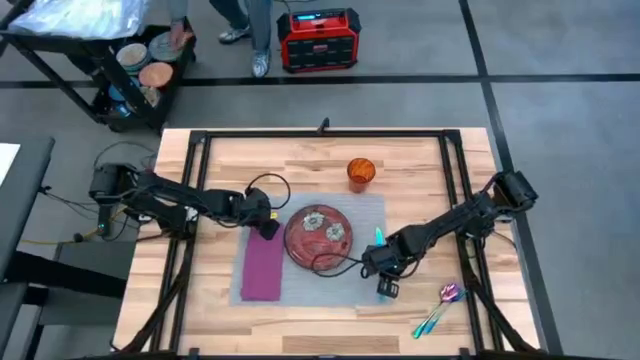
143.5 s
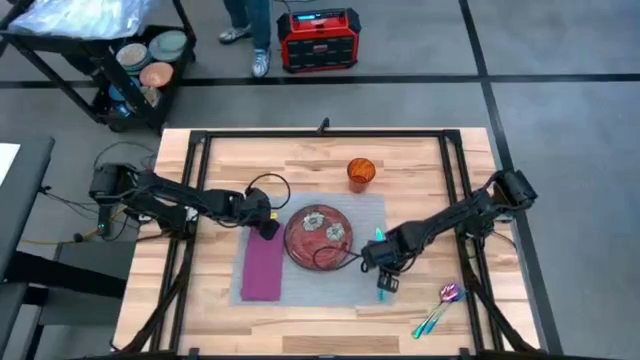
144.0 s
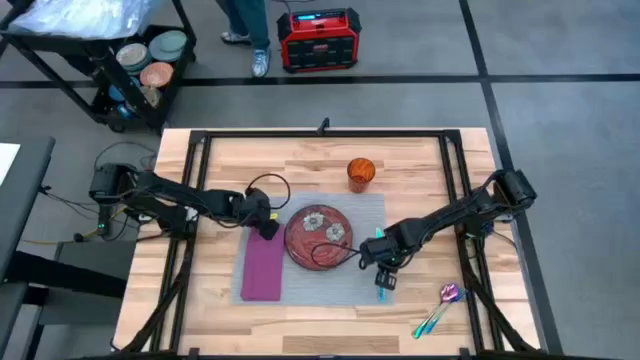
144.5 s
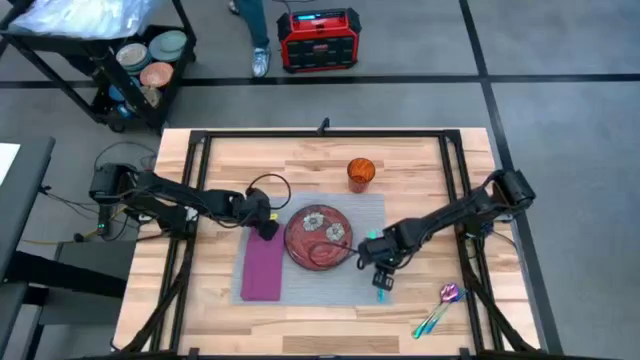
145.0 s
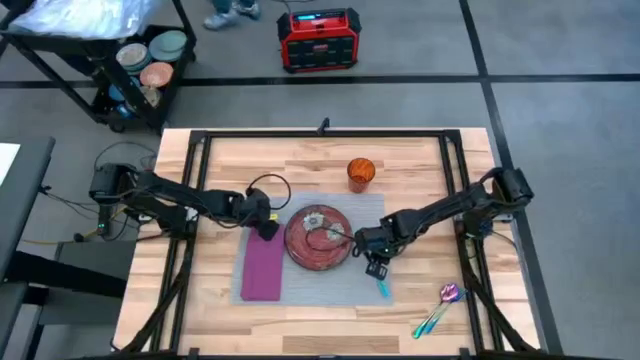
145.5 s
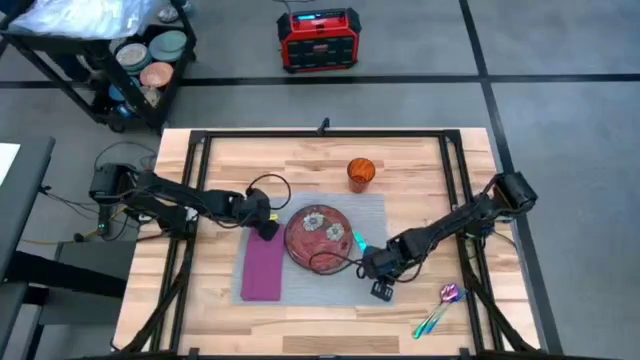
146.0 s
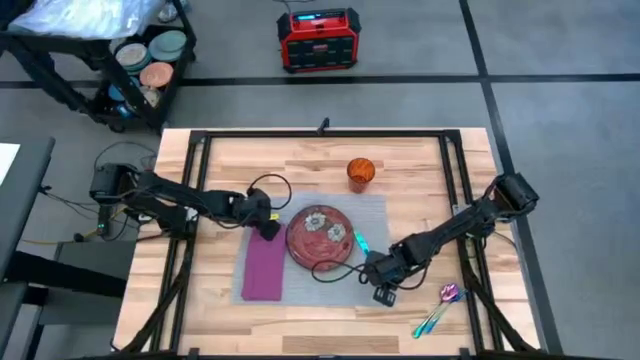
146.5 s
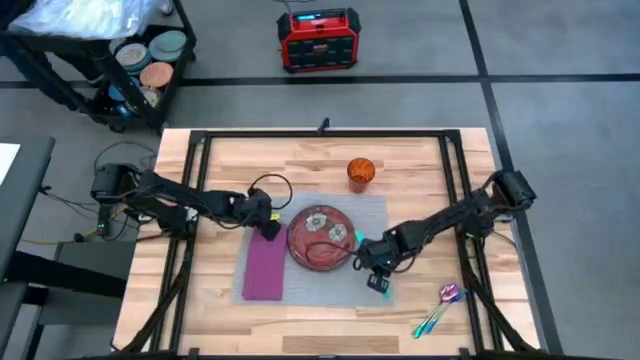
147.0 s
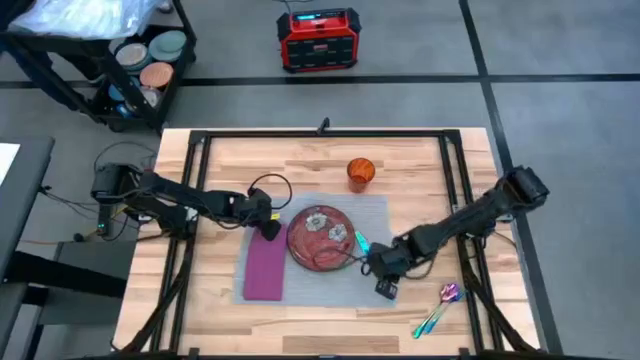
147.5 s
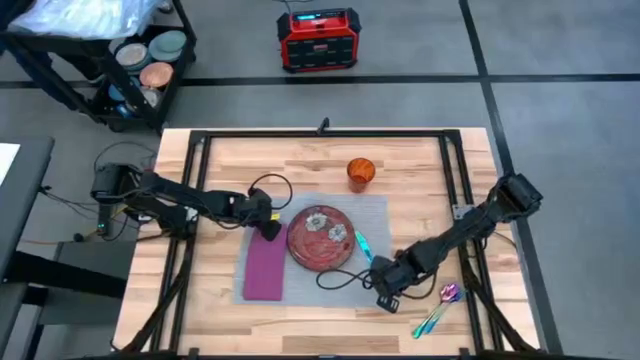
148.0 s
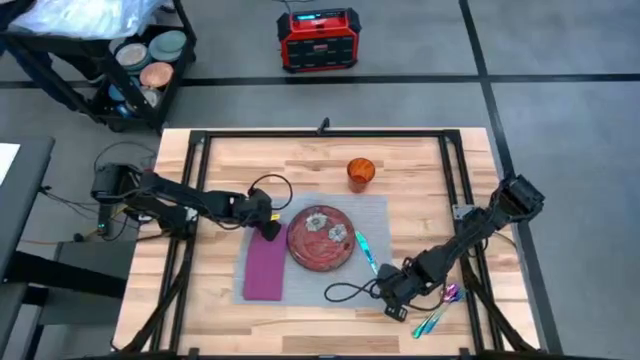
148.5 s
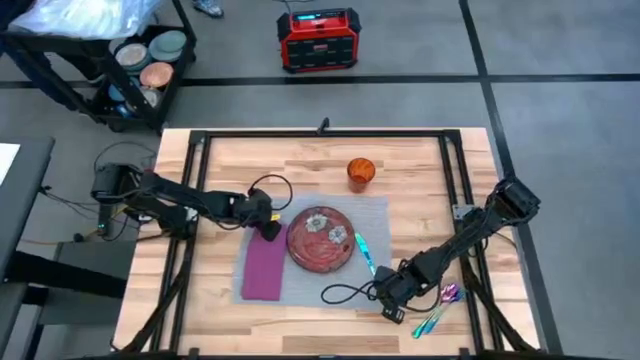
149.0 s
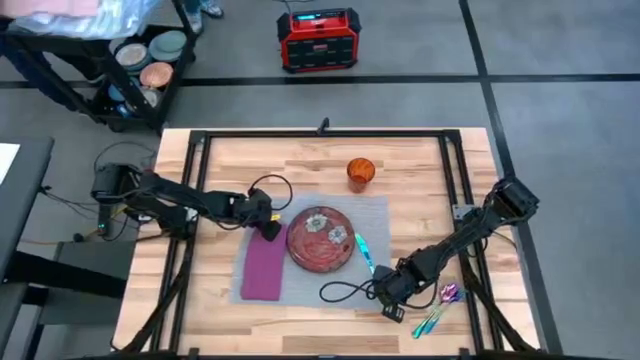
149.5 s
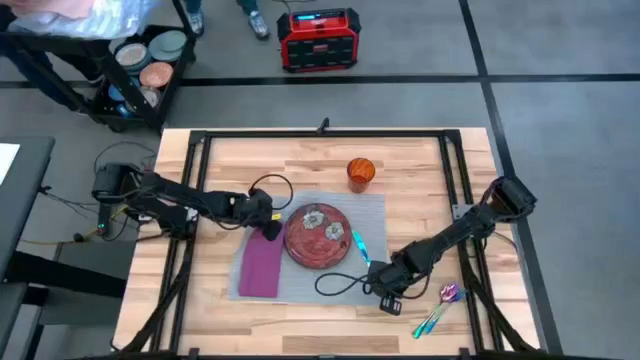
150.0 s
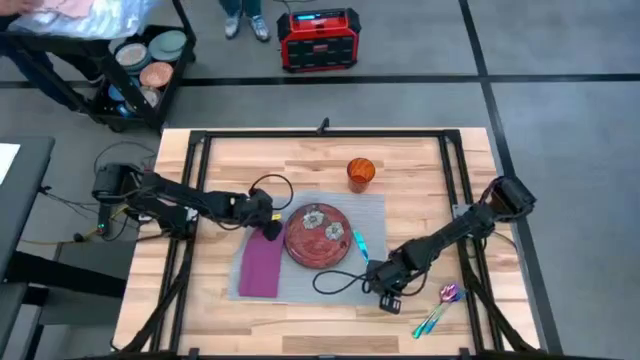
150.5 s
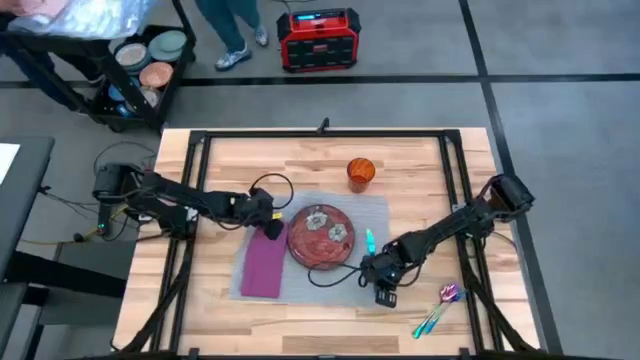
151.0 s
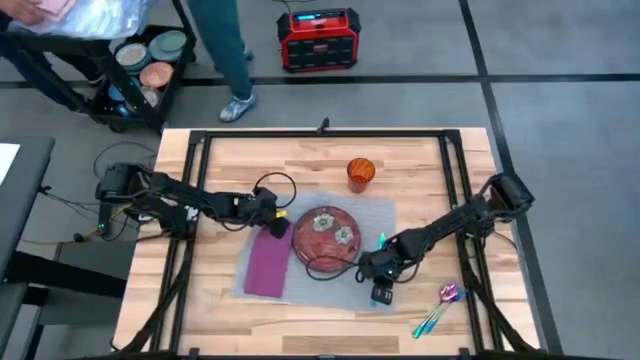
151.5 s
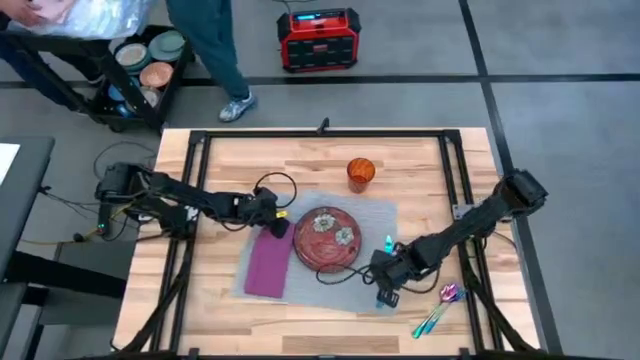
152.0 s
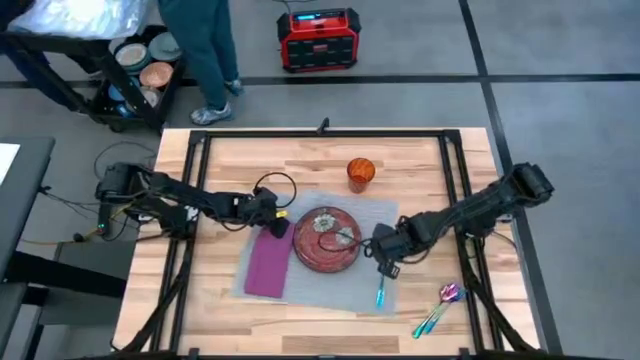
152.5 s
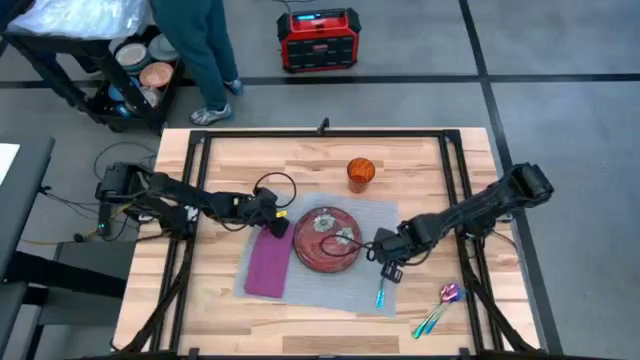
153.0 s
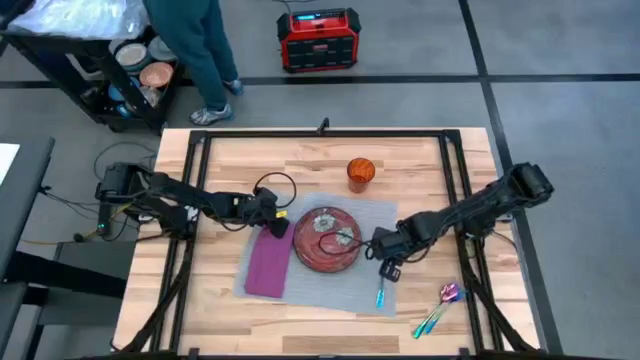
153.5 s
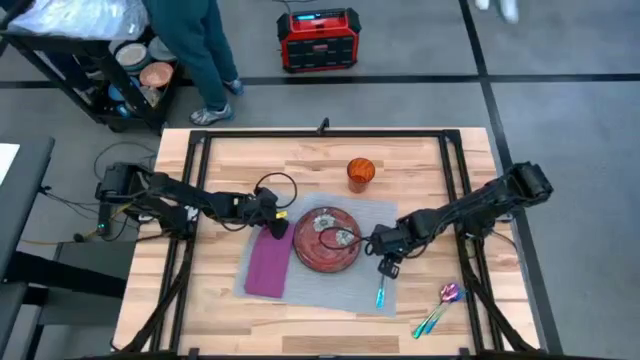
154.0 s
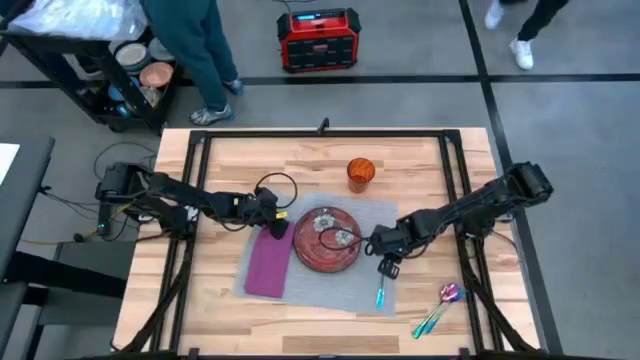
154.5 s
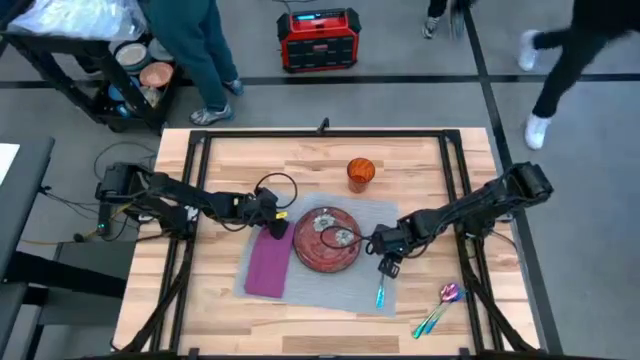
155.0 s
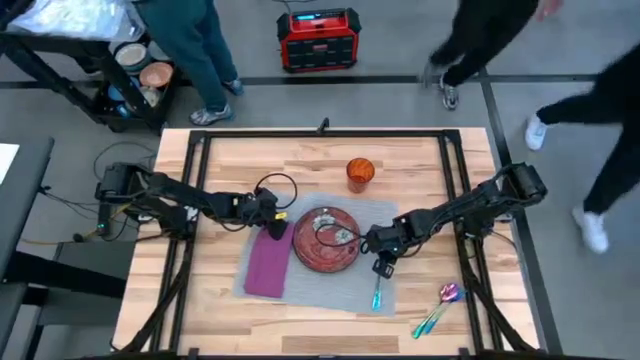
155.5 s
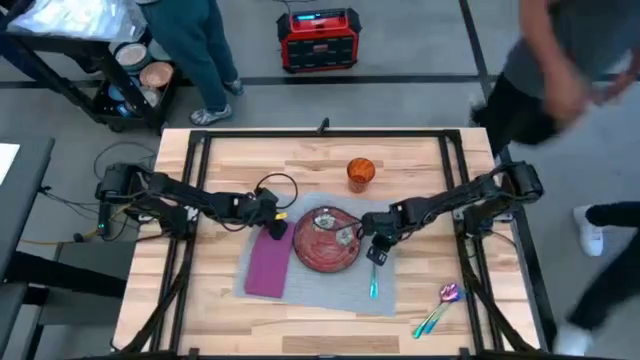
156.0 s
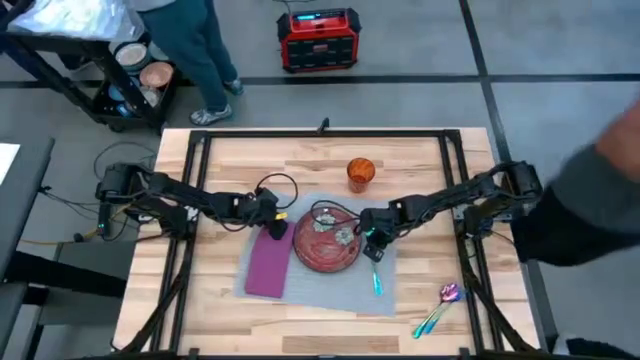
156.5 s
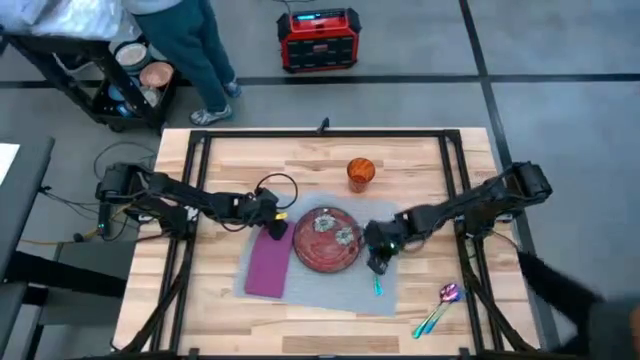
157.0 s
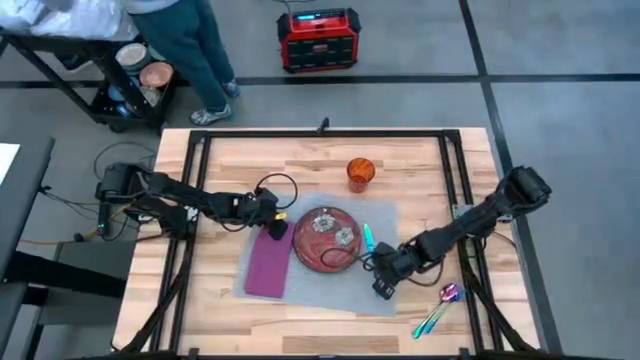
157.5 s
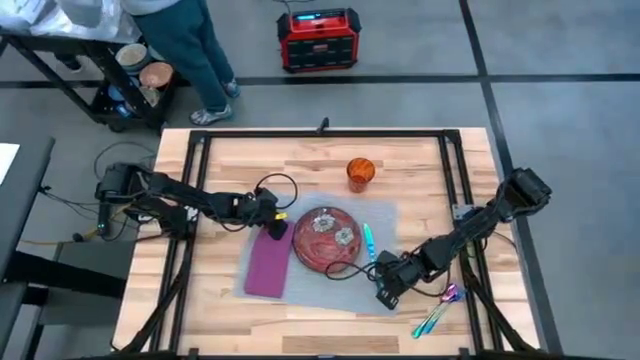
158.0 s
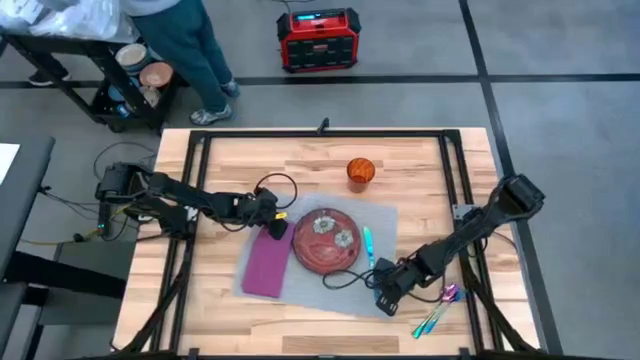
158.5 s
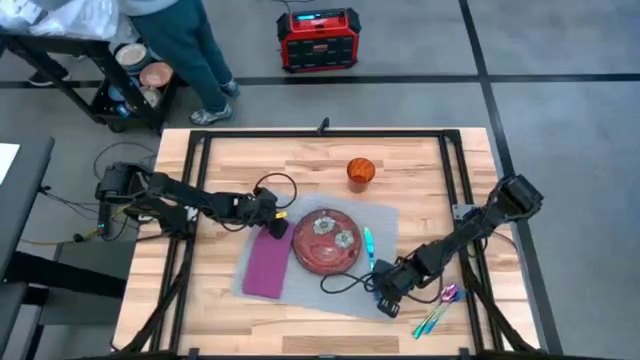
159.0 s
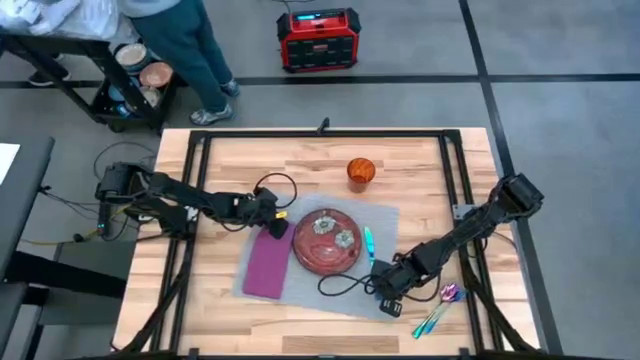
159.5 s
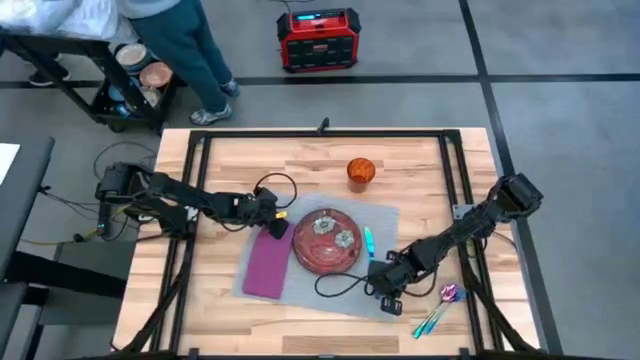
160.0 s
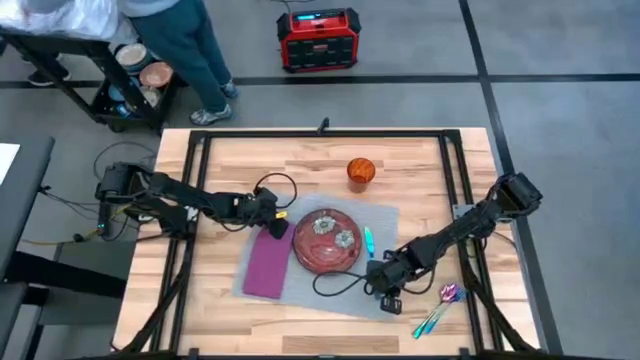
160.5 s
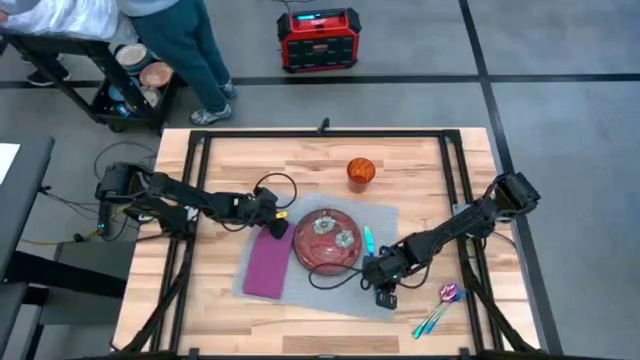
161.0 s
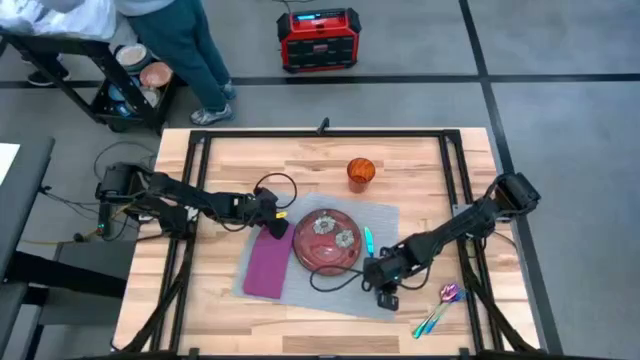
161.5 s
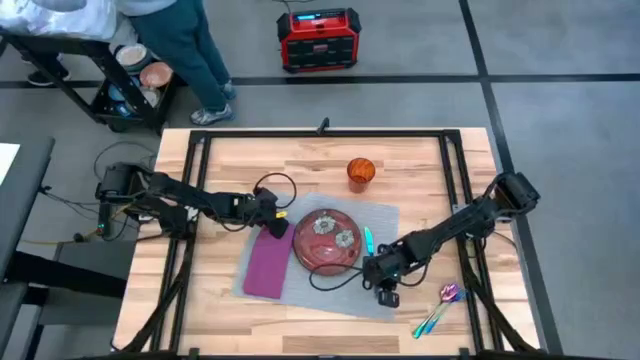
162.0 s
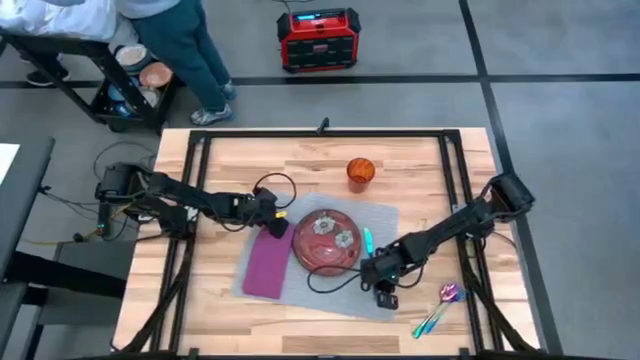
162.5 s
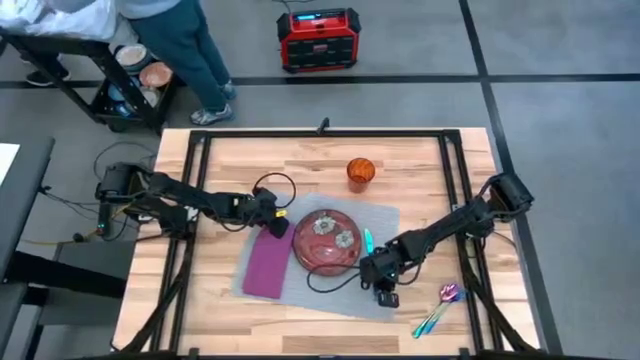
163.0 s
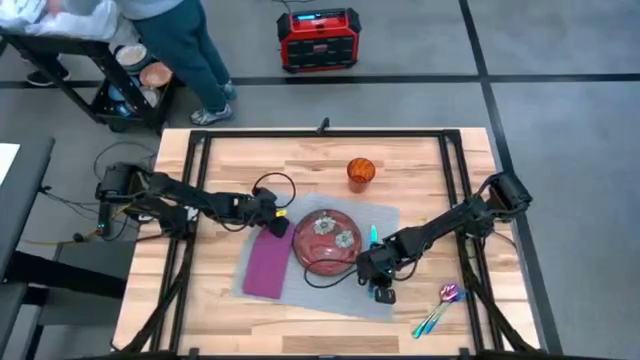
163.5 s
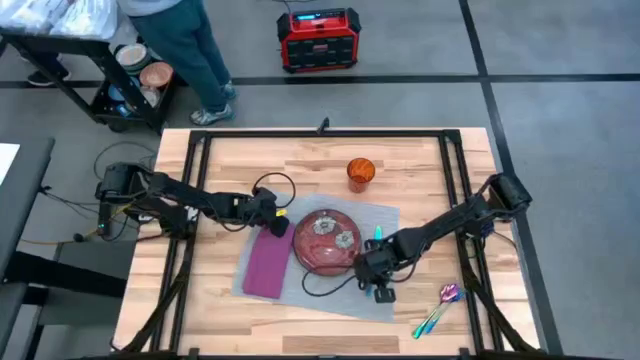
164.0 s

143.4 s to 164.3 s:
Task: Set table place
Adjust the blue knife on the table mat
